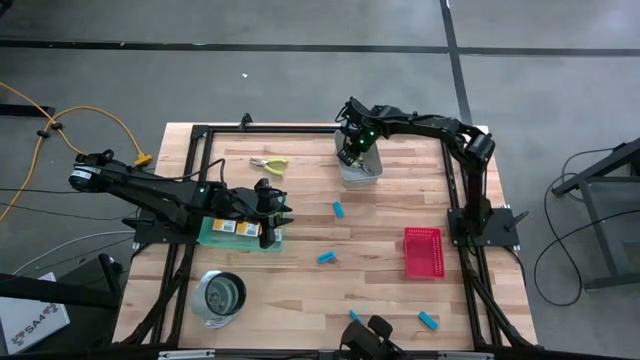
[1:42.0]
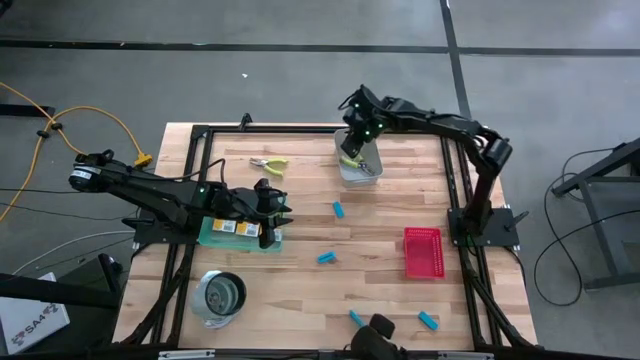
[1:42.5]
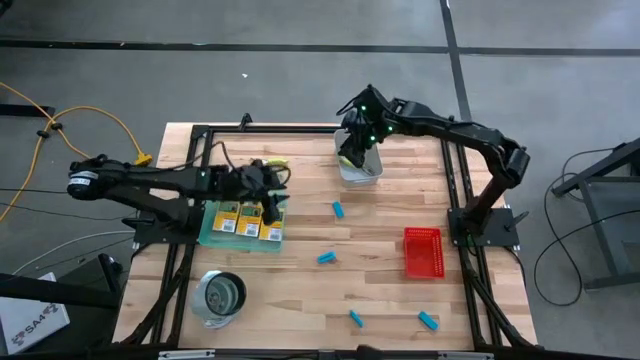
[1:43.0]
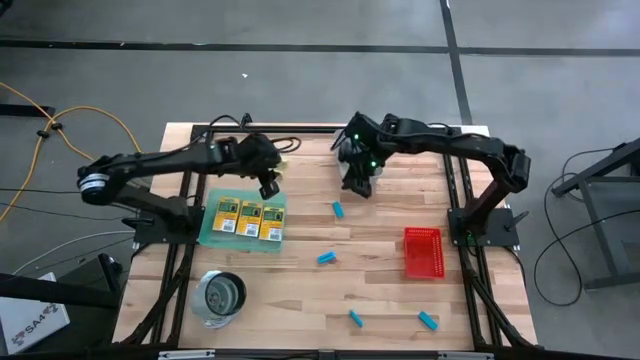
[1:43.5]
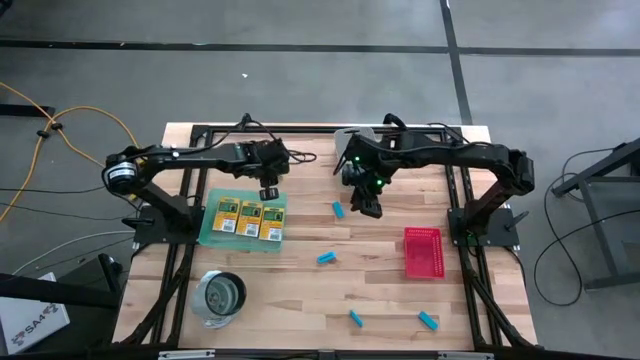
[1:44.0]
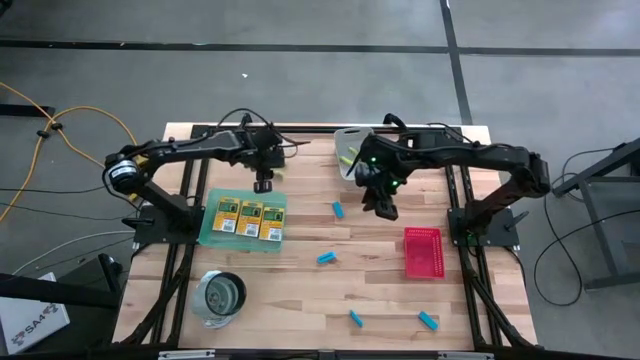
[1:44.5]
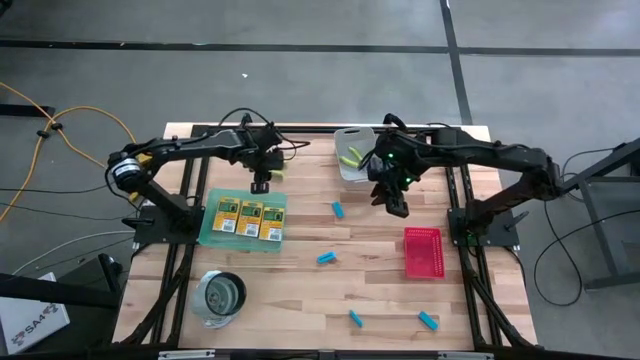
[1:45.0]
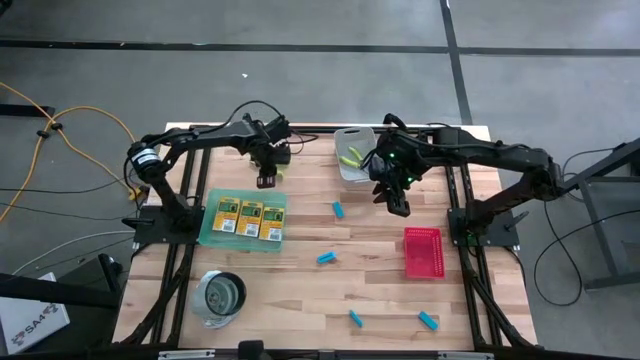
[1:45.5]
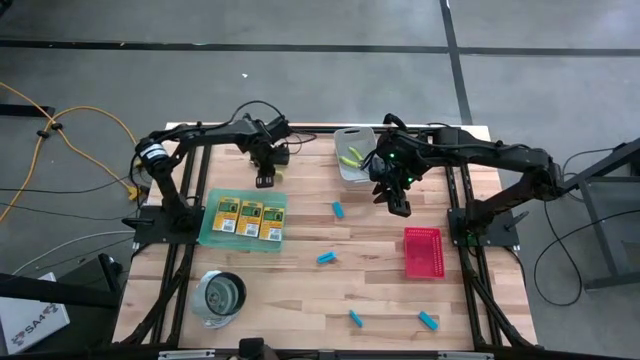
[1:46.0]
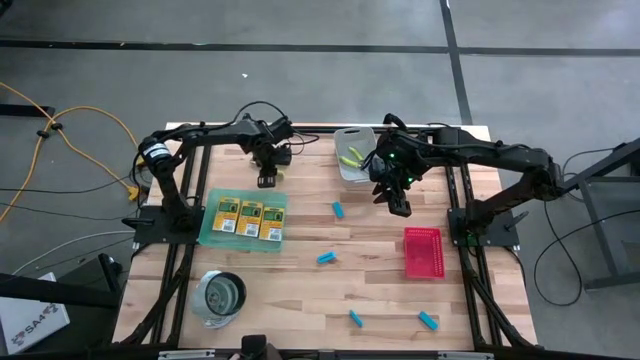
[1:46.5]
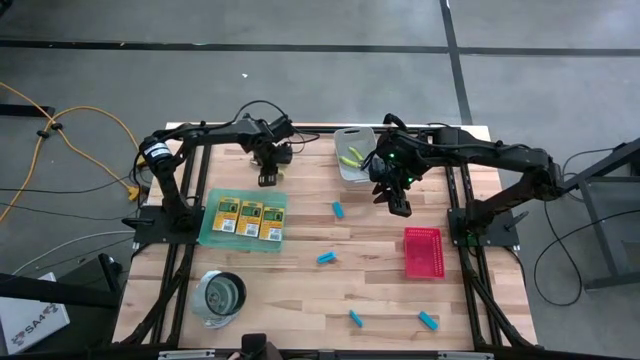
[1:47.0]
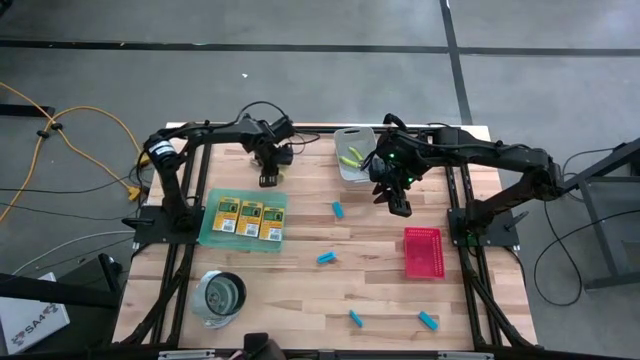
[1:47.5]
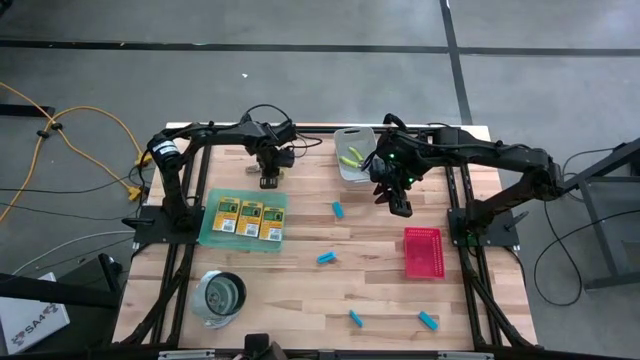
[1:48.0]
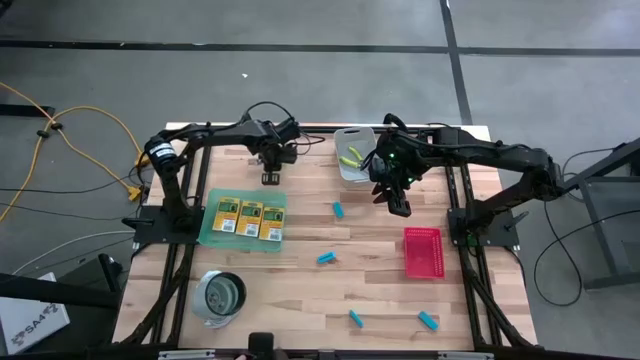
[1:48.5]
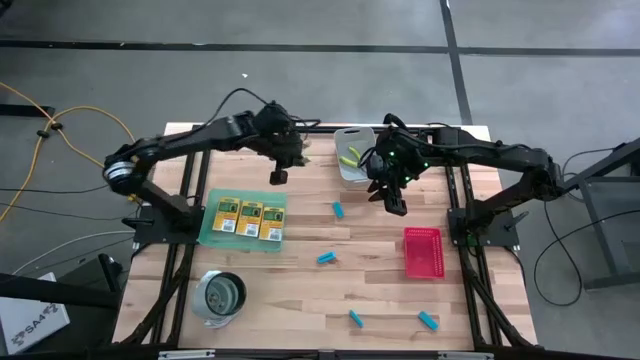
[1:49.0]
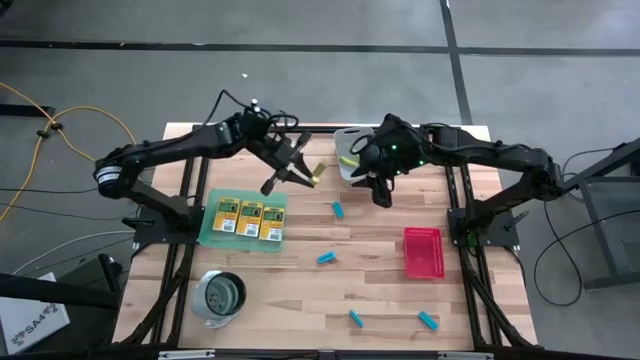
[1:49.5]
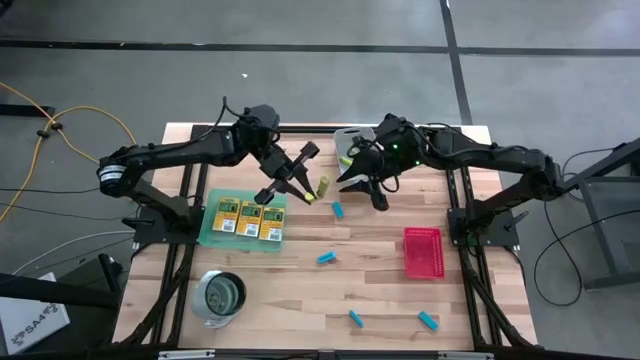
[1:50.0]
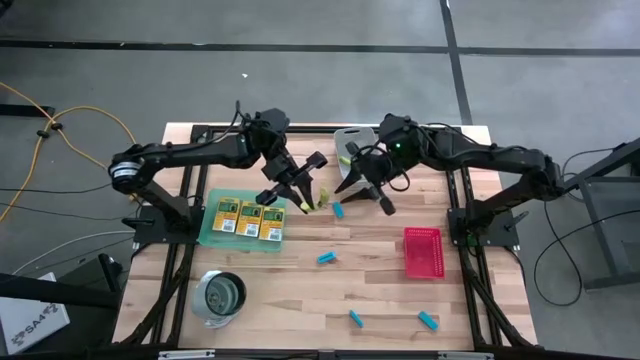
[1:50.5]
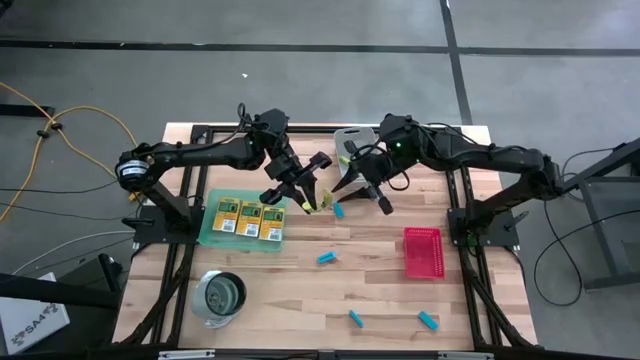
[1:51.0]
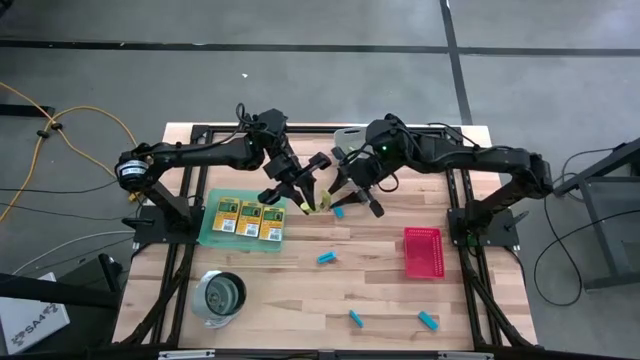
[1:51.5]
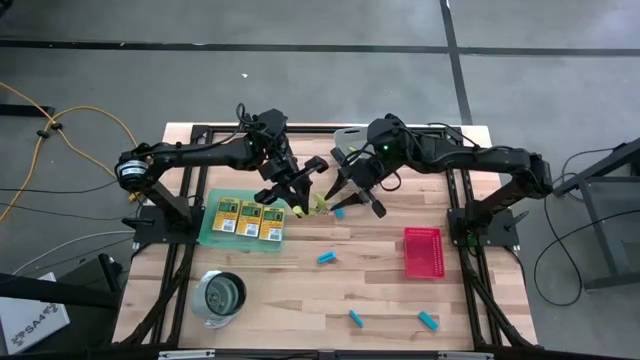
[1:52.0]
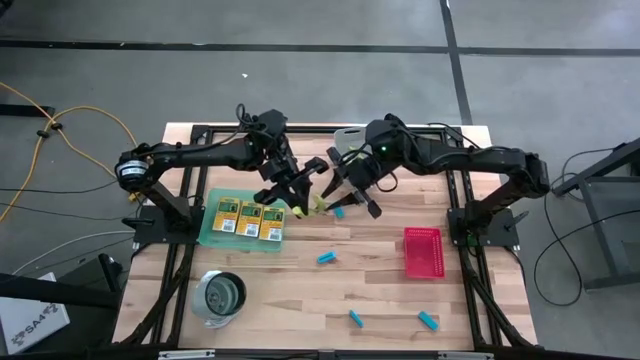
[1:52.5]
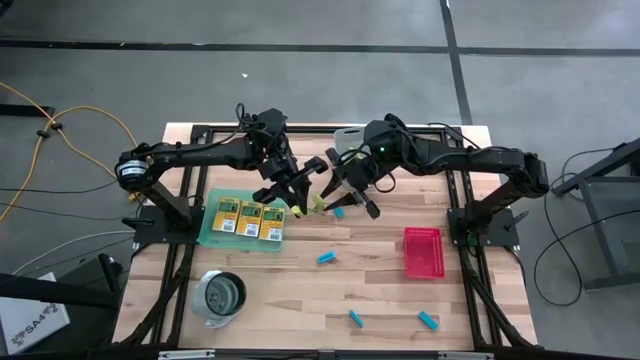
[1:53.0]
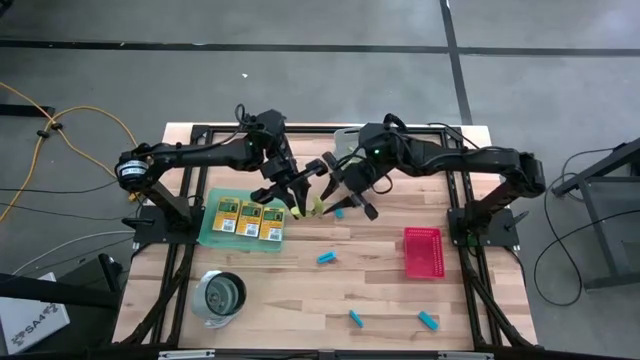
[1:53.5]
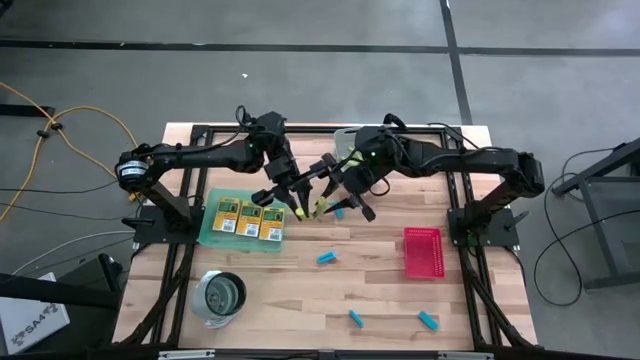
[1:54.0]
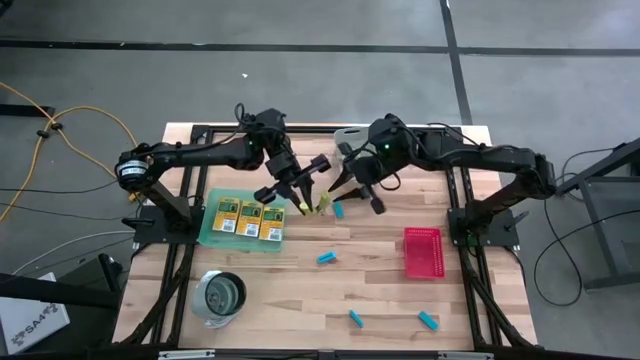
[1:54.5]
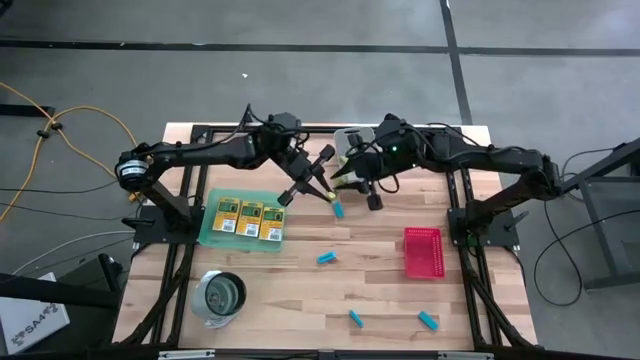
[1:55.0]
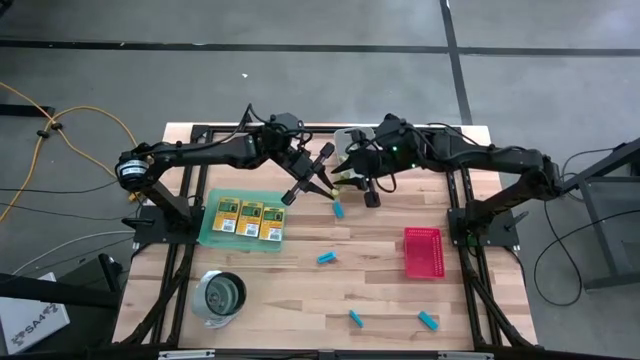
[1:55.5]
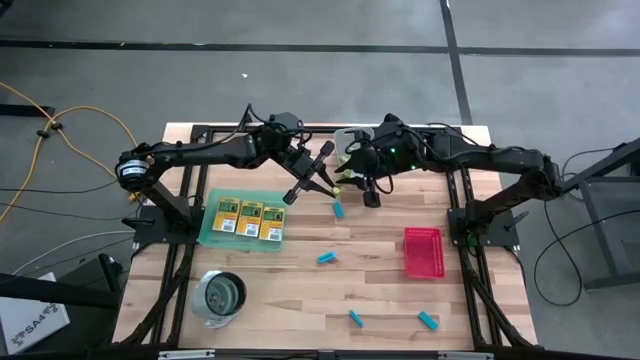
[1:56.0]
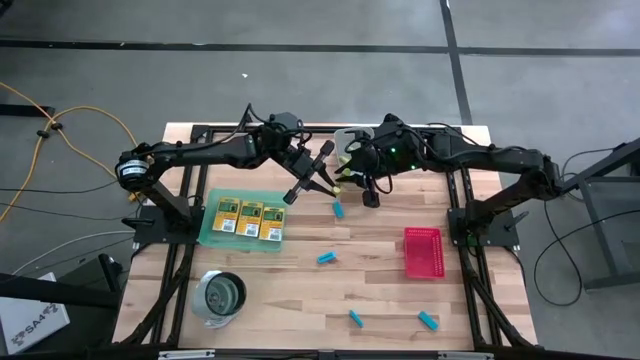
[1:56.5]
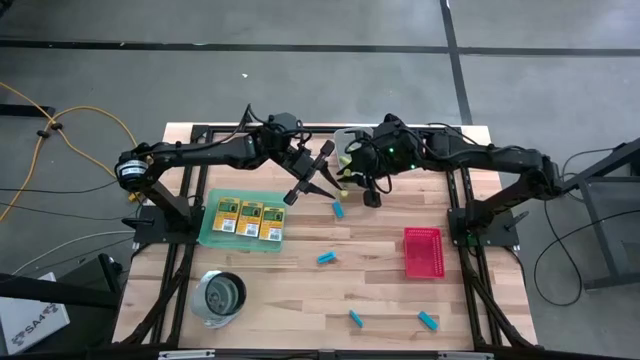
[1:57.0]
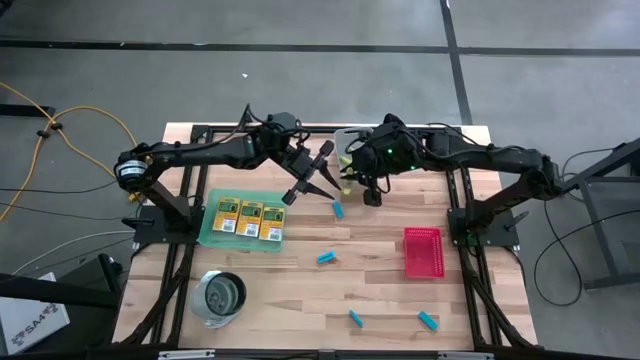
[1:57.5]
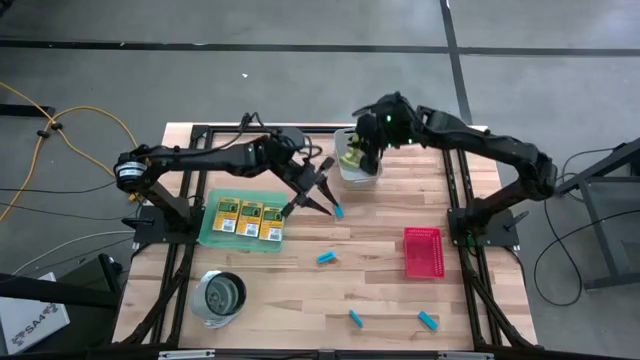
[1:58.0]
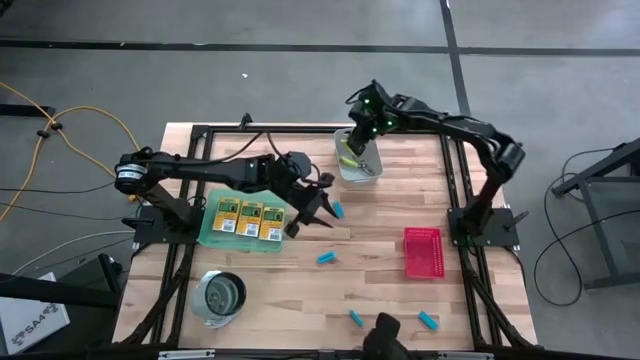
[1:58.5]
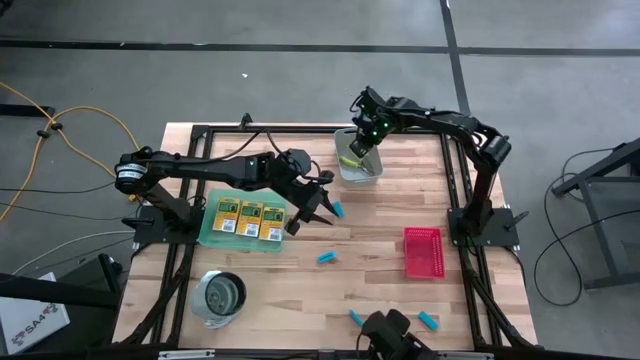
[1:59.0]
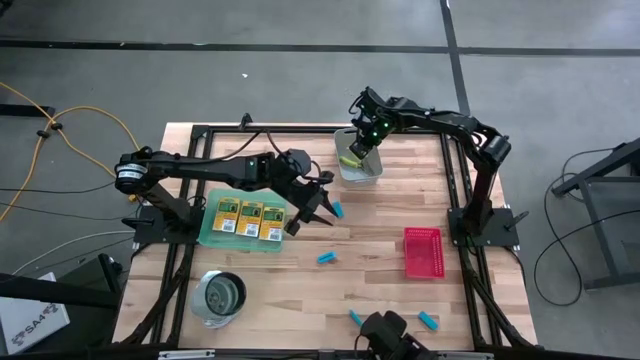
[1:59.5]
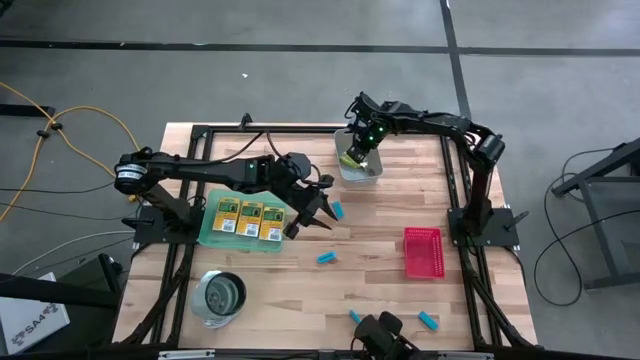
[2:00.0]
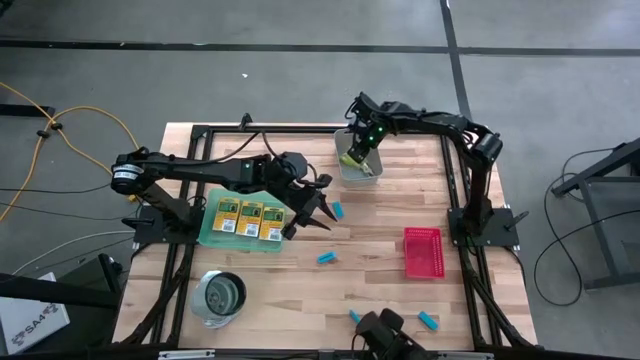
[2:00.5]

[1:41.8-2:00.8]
Task: Pick & Place School Supplies
Put the green puncher into the gray bin

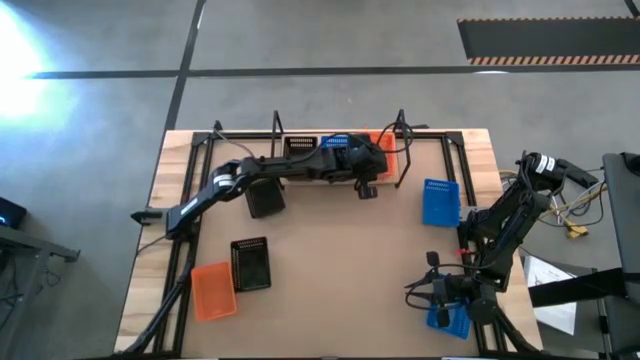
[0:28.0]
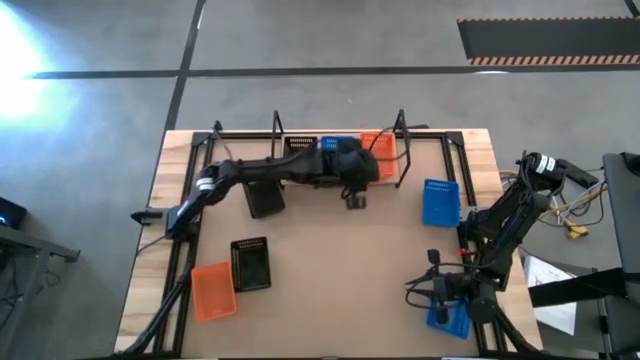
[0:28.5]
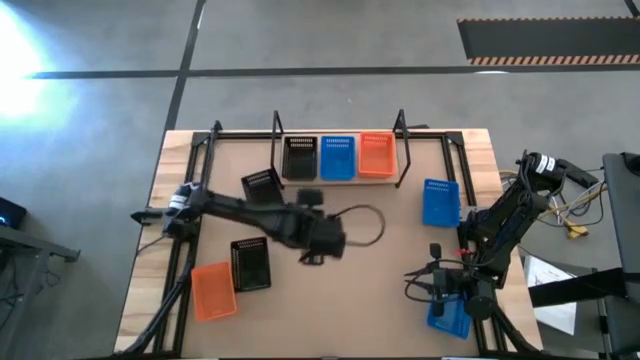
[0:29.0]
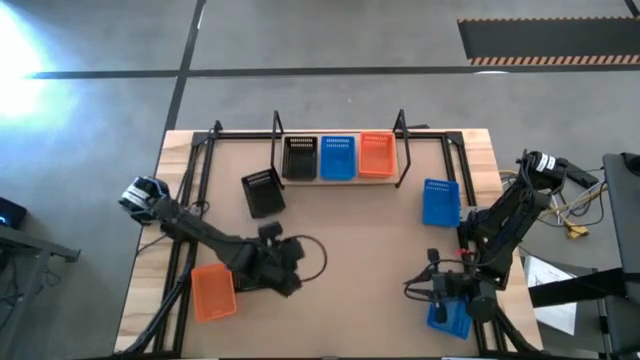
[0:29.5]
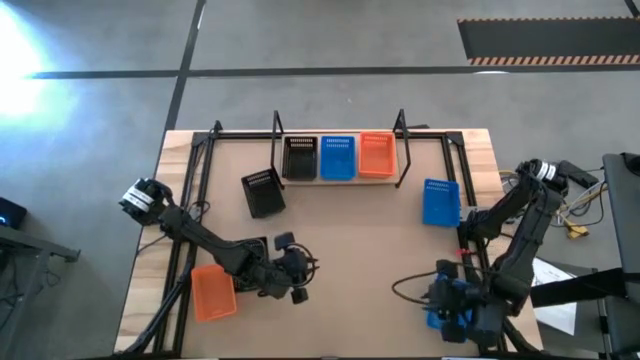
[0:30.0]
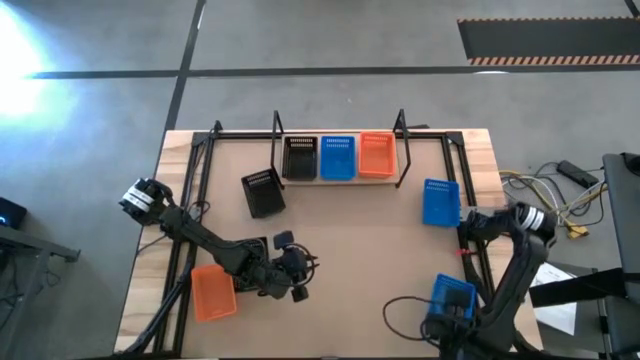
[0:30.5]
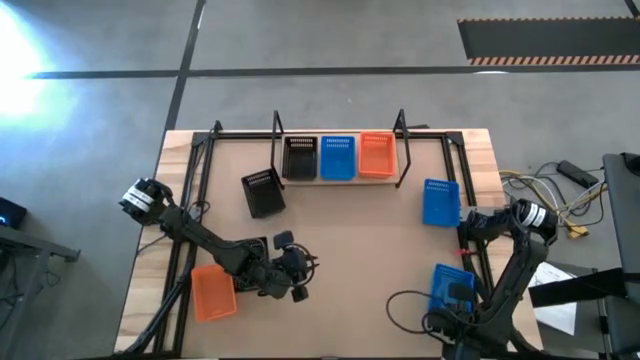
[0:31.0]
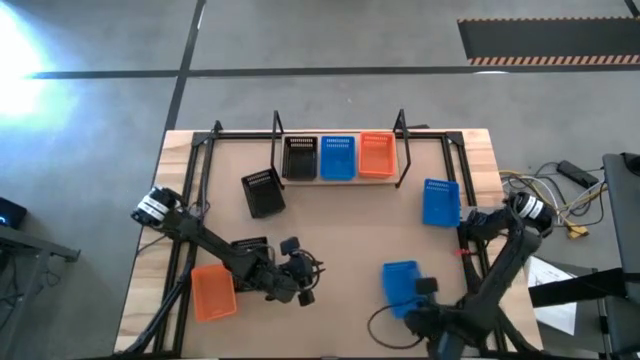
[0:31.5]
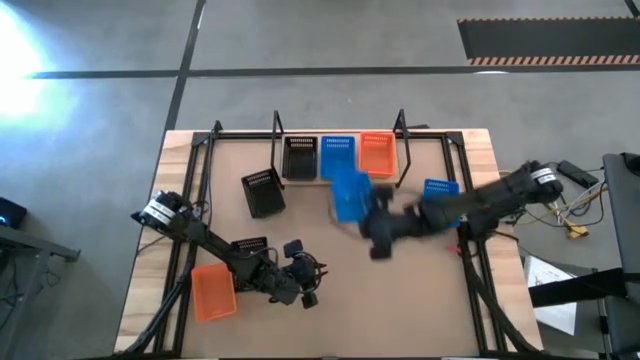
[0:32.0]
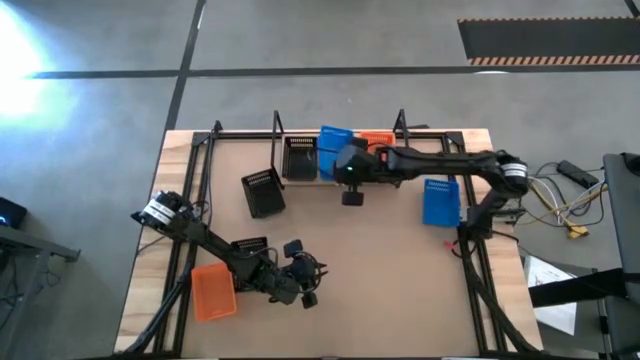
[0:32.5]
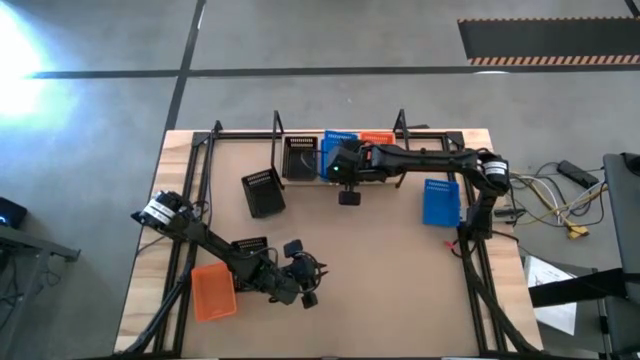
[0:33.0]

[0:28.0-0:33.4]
Task: Stack baskets on shelf by color
Stack the bottom blue bin on the blue bin on the shelf
